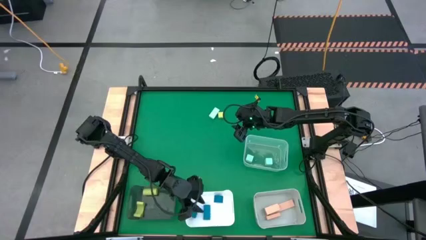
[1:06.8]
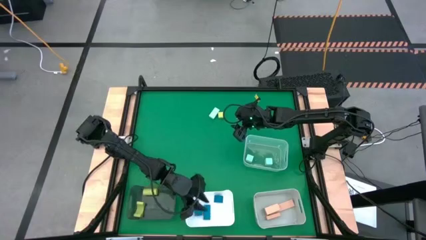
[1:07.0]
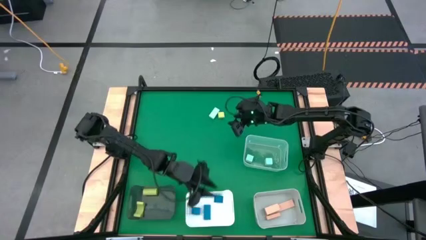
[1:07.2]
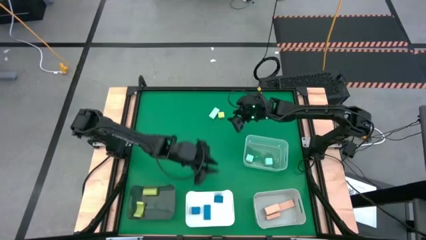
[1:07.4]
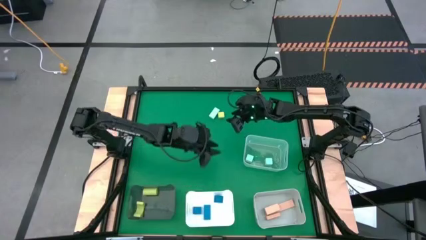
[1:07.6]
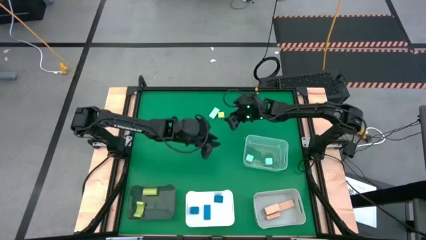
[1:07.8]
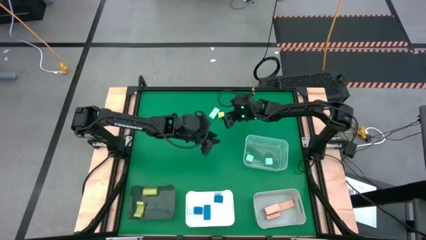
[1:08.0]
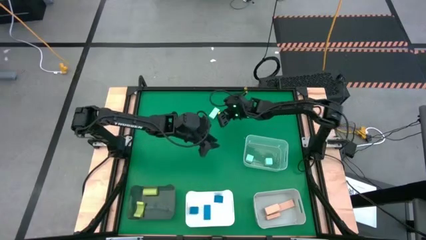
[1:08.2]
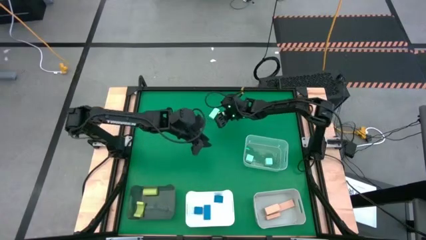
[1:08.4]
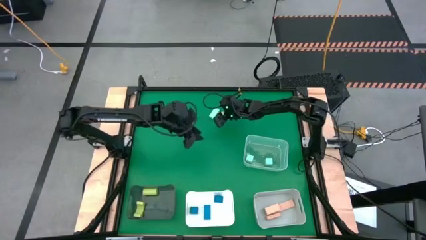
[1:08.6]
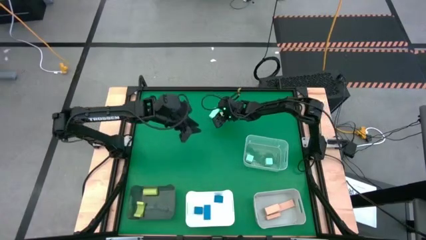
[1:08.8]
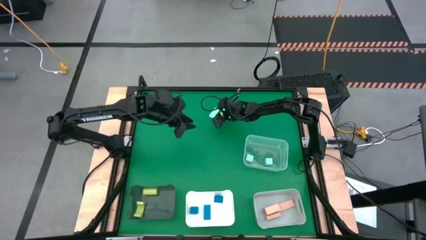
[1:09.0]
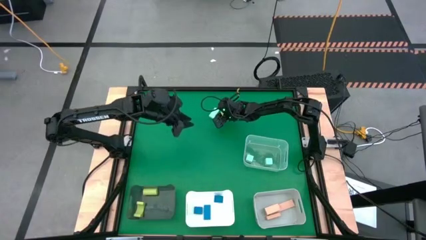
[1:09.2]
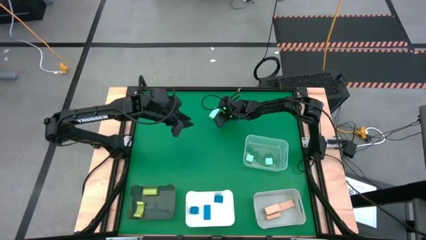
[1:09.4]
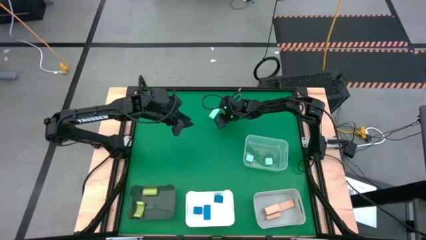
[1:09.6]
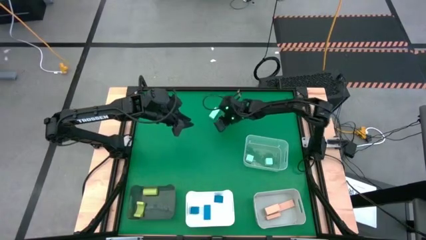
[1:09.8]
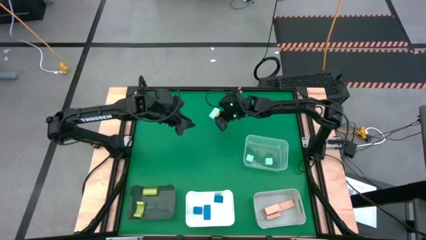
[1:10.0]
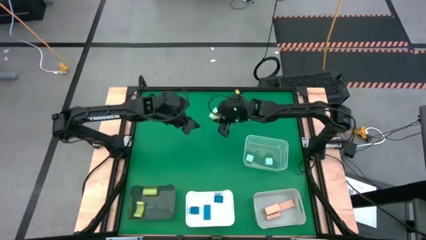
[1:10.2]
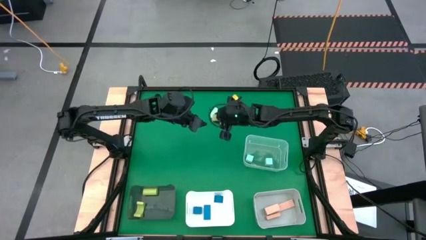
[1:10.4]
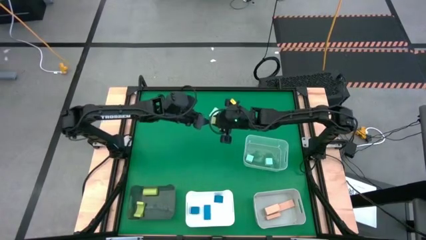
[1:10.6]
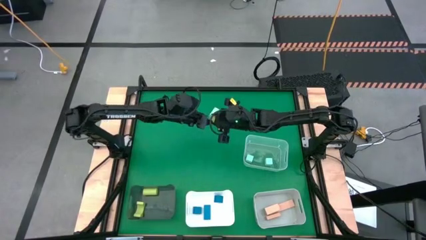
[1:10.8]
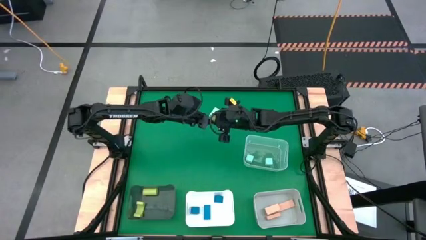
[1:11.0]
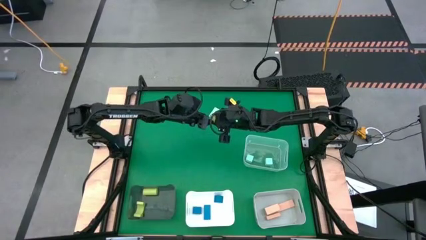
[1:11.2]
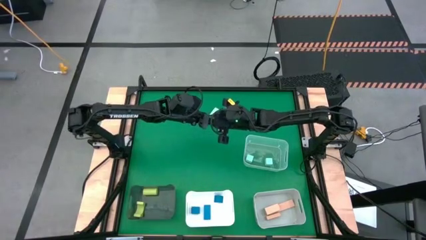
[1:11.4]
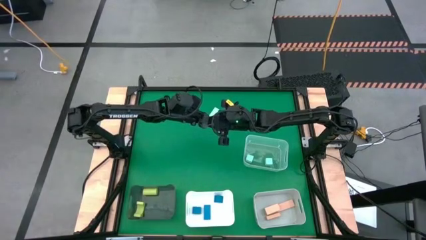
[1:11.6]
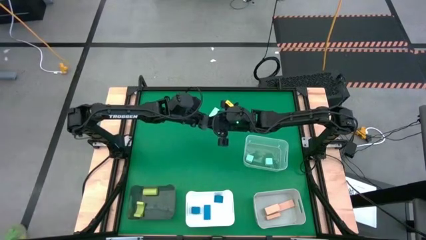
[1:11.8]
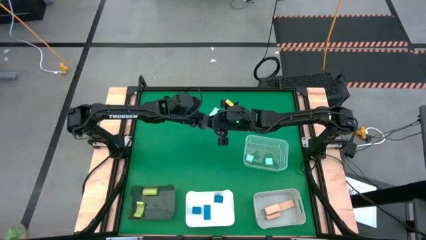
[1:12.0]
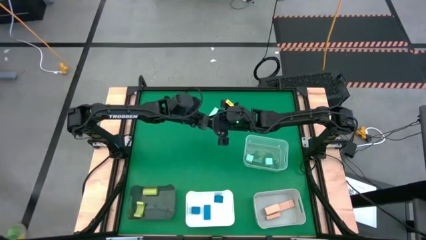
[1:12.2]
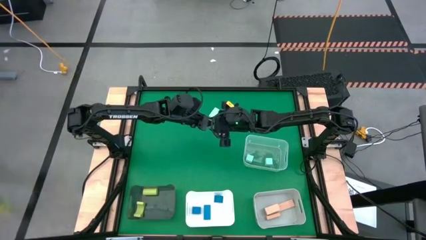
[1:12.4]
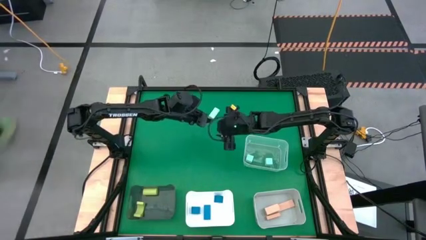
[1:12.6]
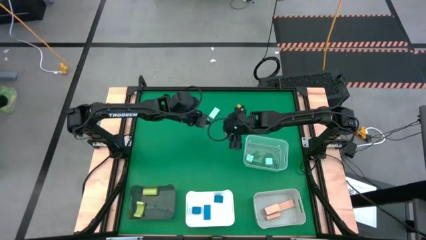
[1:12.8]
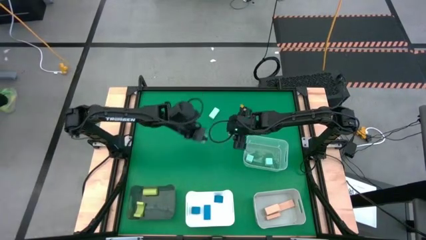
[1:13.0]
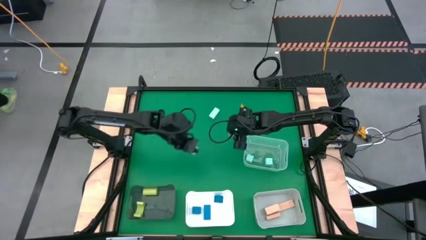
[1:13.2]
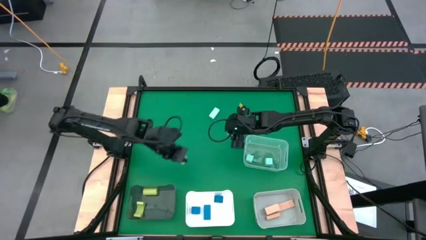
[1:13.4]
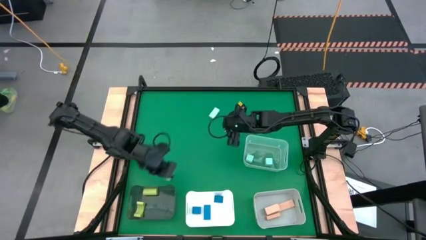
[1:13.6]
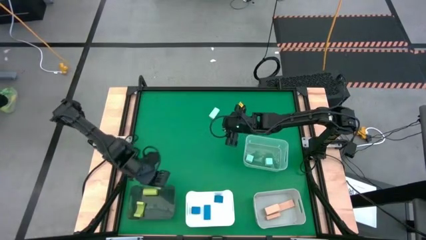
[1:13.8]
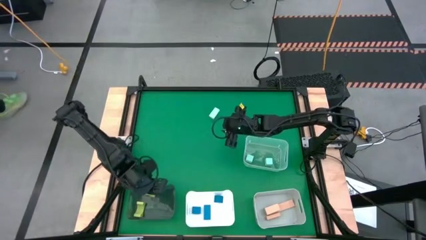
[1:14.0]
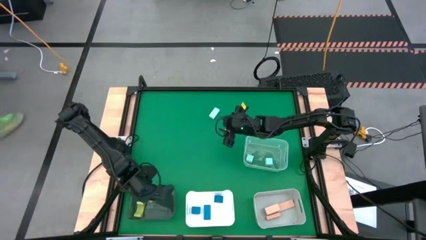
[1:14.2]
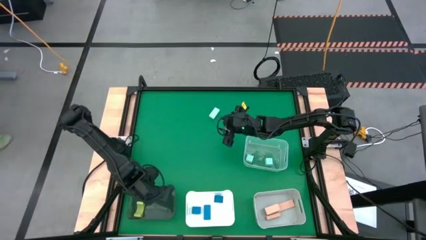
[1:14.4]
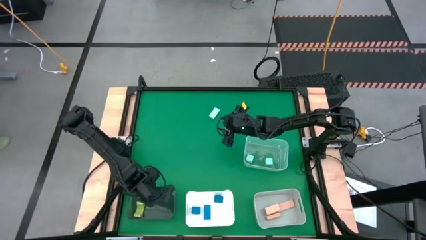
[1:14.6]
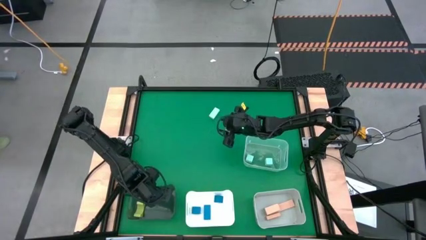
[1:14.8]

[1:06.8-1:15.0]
Task: Sort & place blocks by color
Put the green block into the black bin

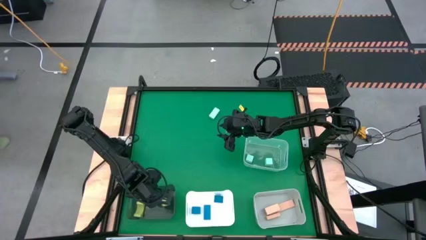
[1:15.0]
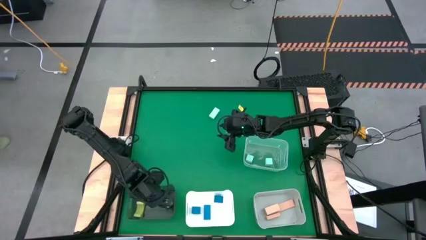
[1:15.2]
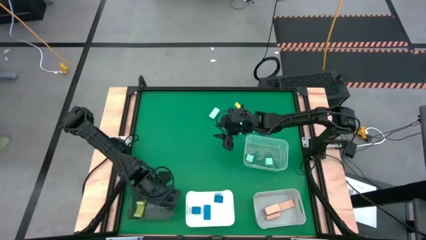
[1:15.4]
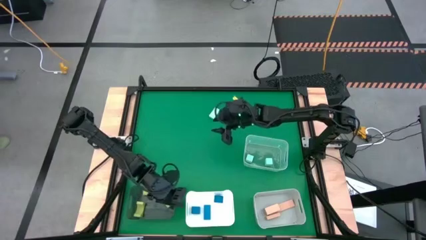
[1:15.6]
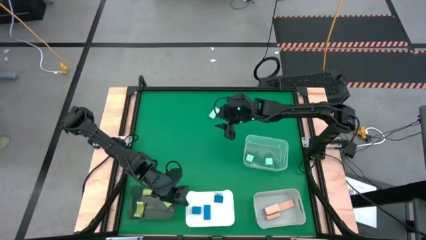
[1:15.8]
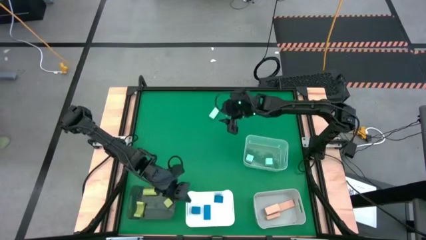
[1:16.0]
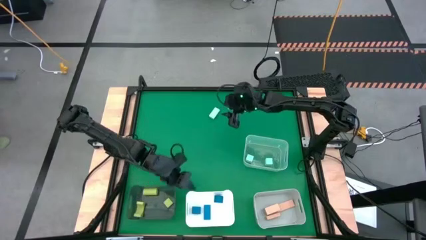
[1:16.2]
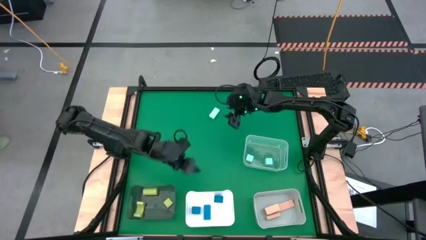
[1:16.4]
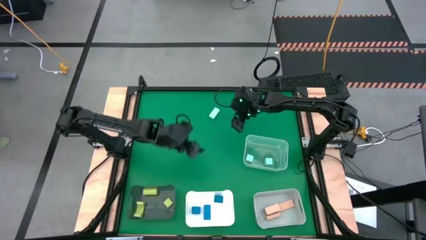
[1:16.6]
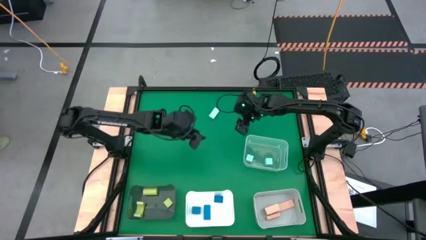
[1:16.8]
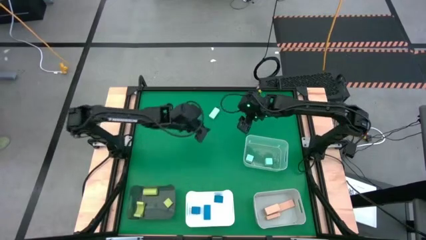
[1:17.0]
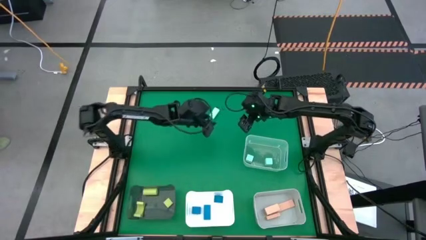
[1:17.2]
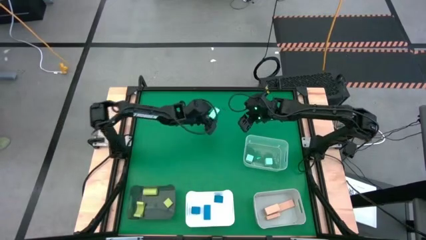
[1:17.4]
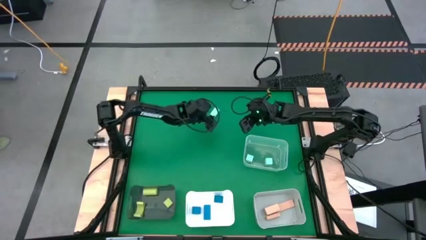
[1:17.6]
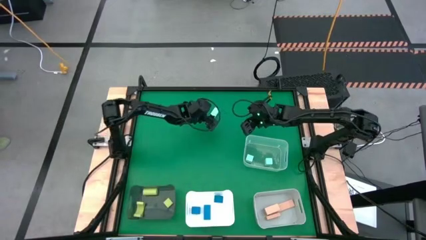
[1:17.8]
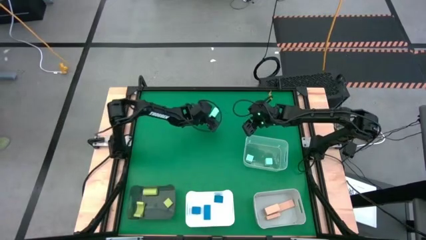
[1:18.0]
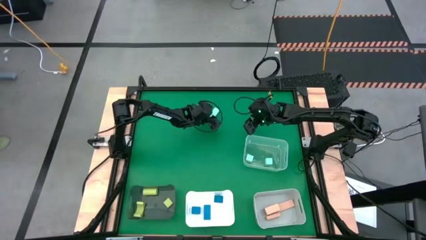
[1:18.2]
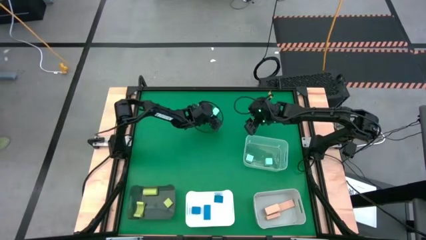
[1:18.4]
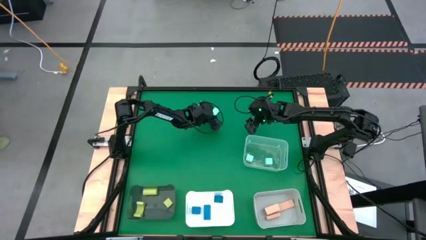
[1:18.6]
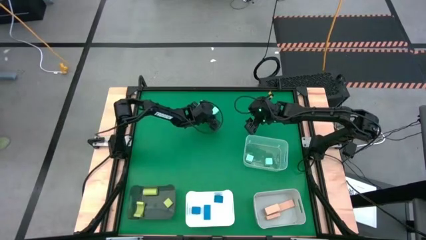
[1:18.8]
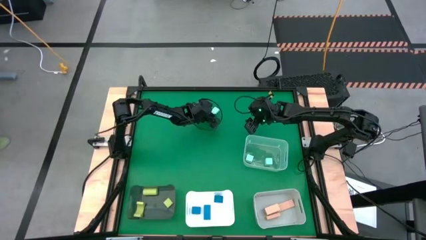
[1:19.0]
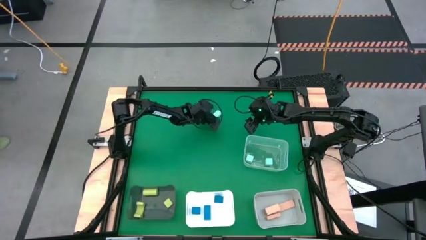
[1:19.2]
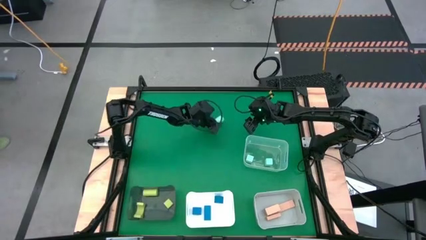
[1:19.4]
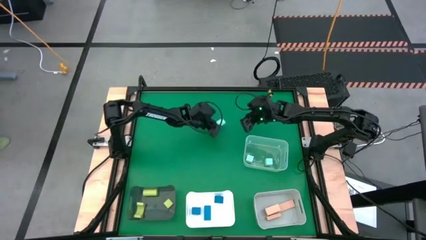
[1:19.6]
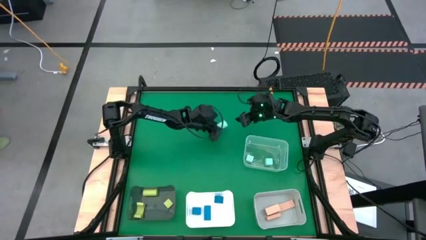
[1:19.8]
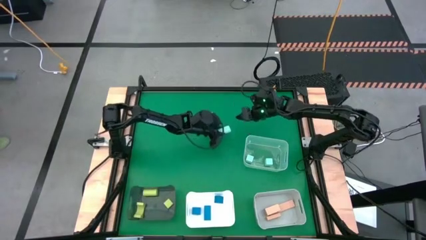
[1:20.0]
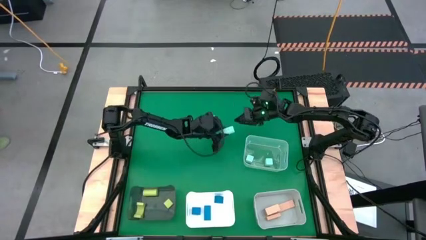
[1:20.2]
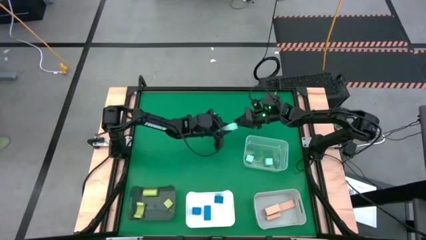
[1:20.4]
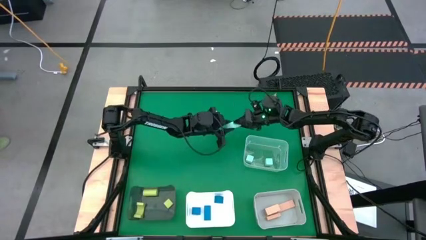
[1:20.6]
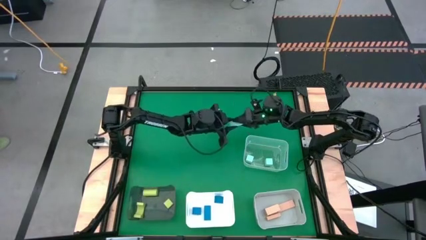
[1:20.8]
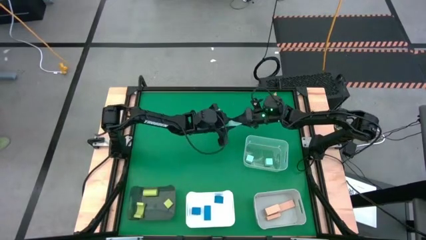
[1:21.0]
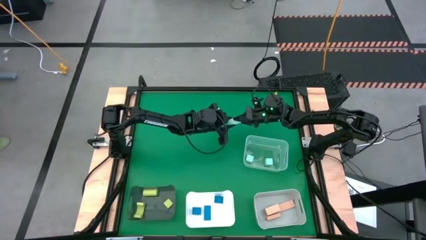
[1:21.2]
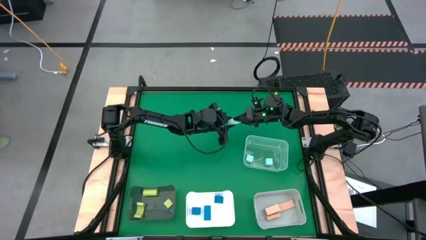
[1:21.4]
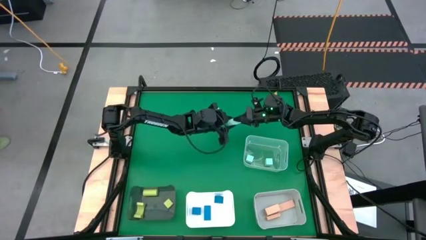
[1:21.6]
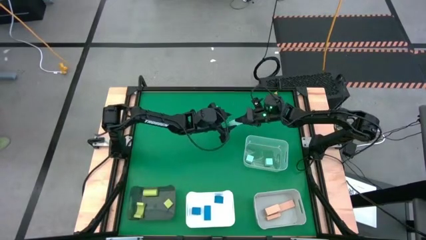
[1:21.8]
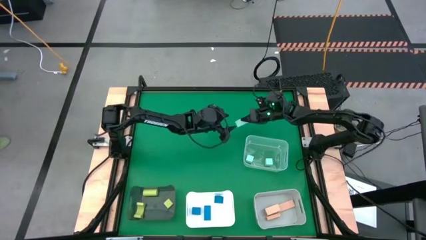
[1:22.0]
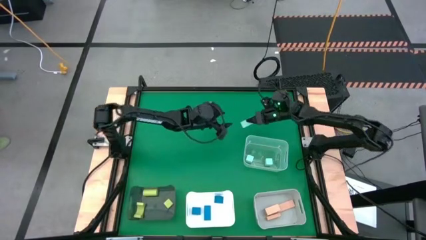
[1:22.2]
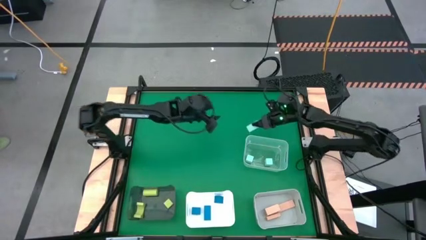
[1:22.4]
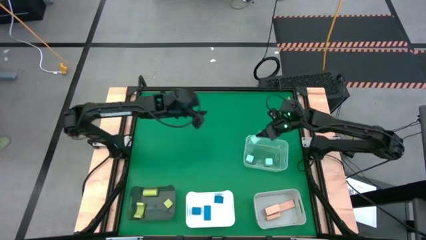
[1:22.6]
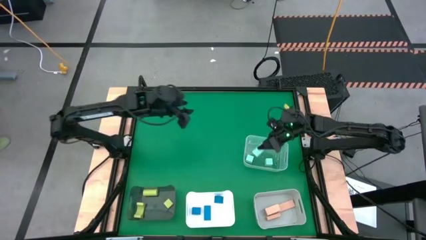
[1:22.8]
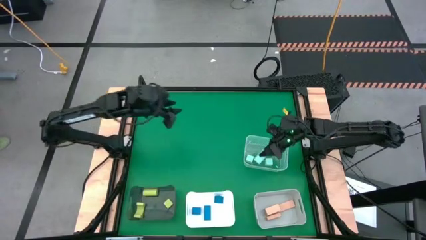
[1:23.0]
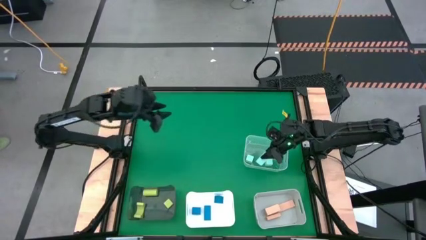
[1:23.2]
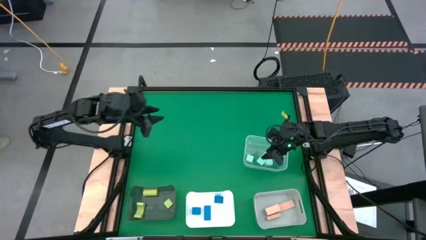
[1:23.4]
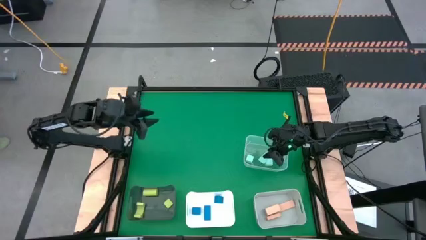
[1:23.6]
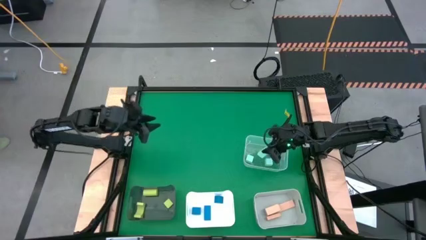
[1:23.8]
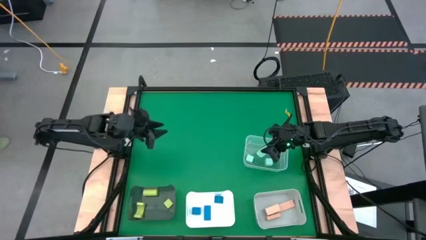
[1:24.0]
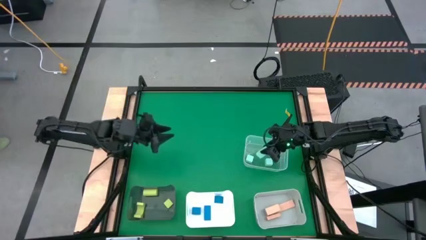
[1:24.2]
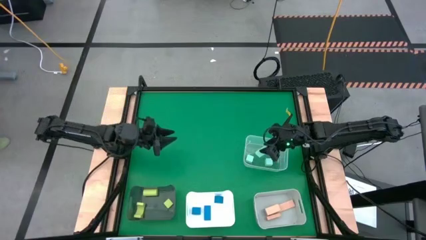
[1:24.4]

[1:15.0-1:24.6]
Put the light blue block into the transparent bin
